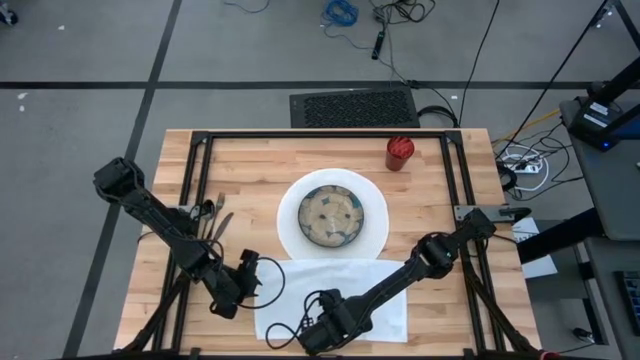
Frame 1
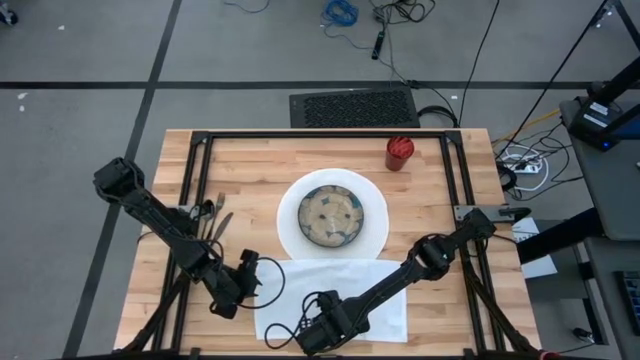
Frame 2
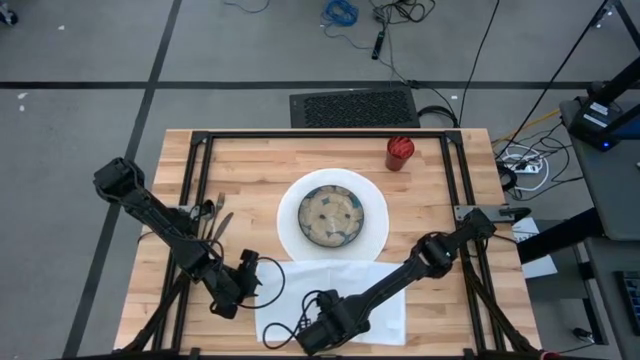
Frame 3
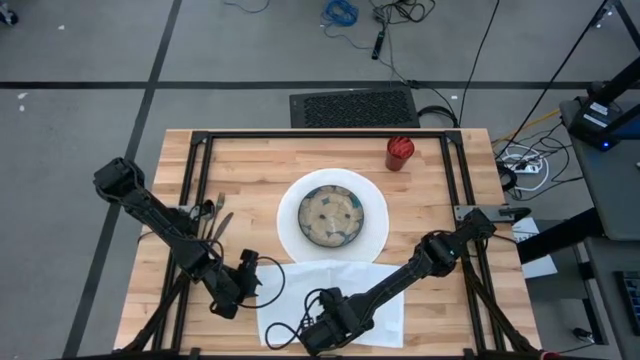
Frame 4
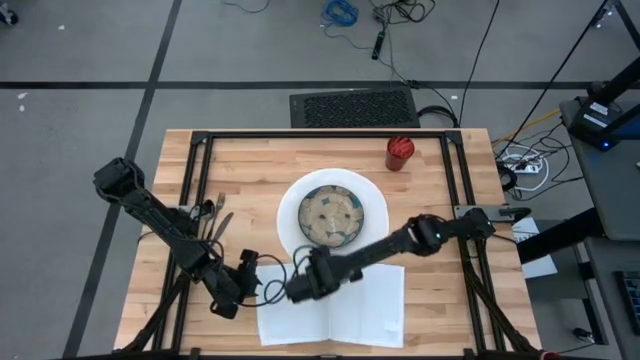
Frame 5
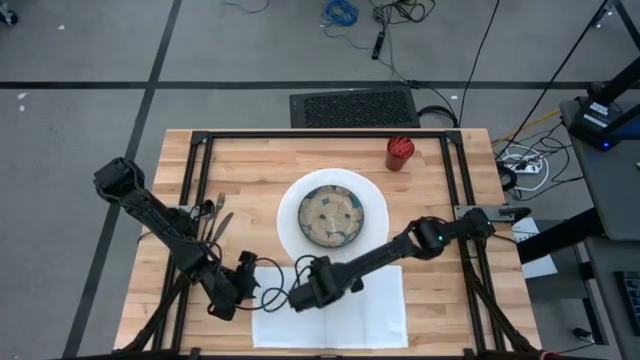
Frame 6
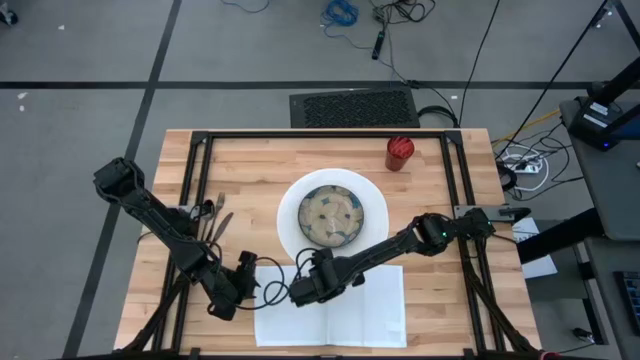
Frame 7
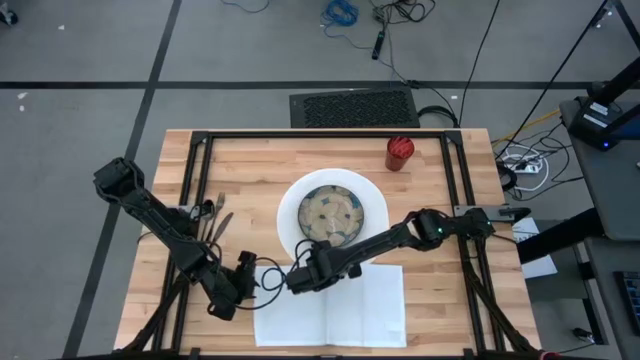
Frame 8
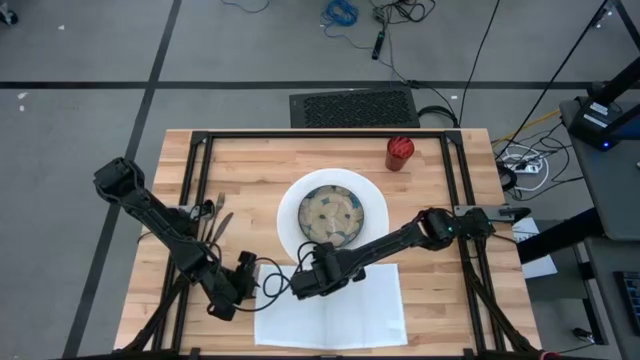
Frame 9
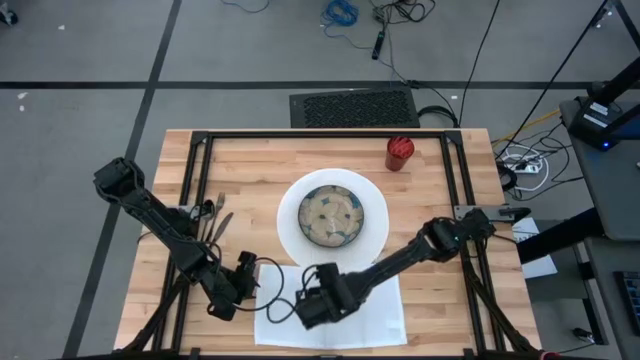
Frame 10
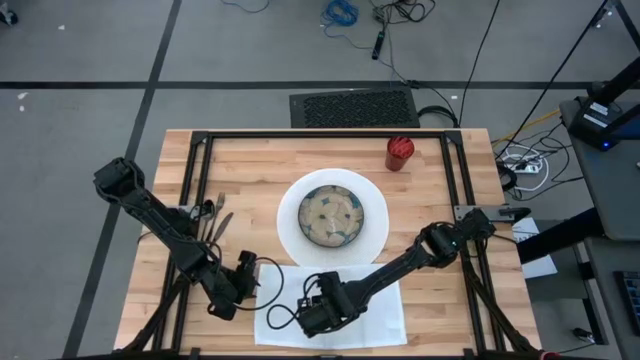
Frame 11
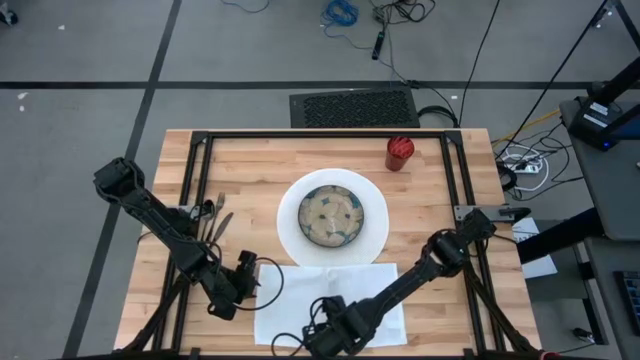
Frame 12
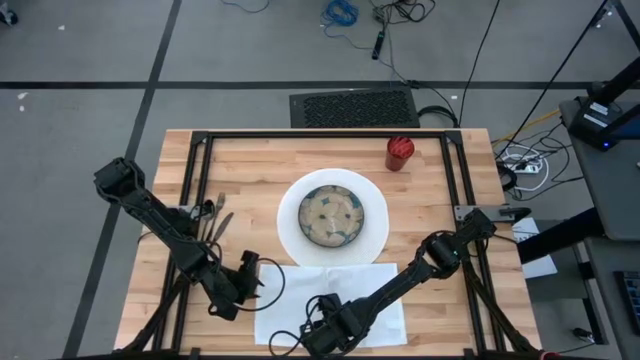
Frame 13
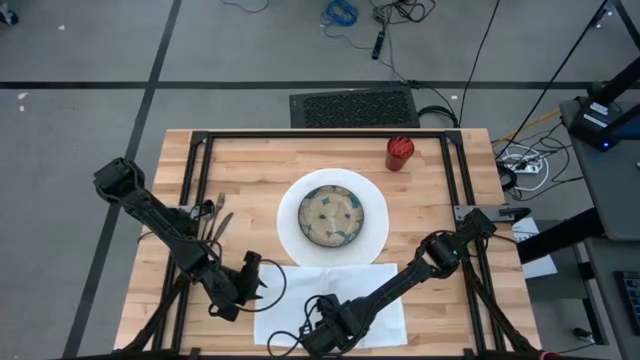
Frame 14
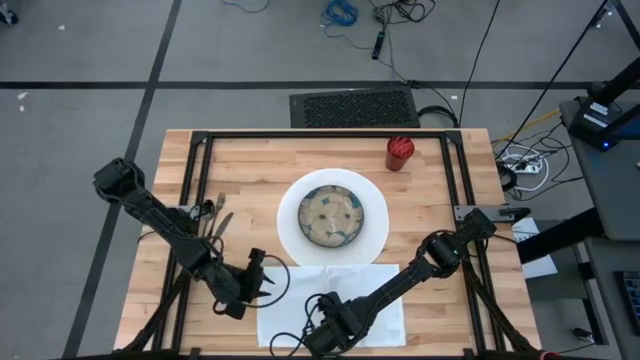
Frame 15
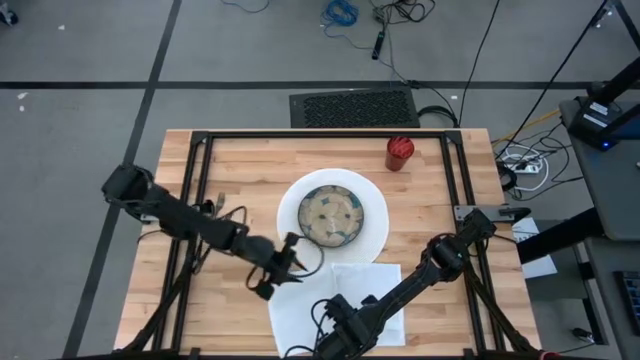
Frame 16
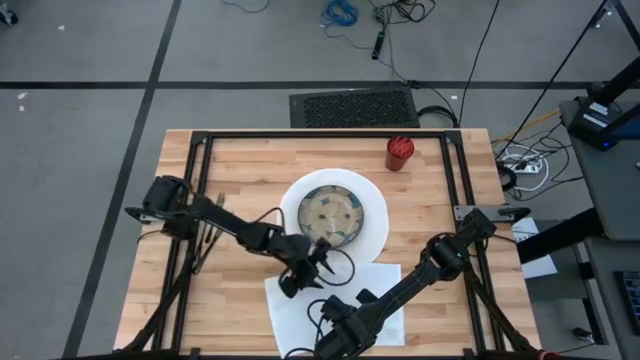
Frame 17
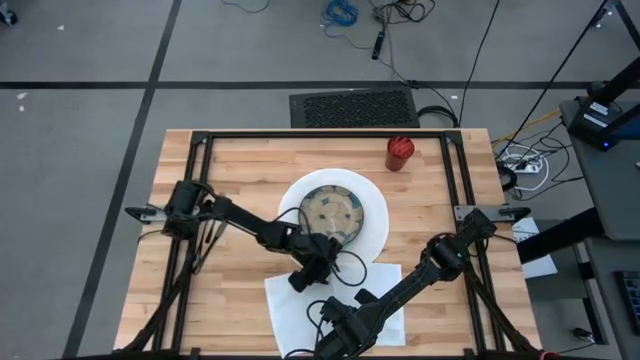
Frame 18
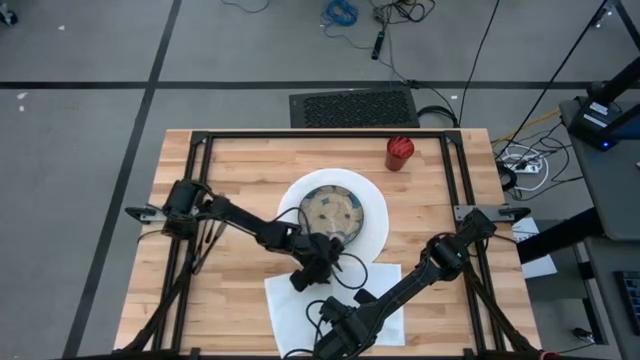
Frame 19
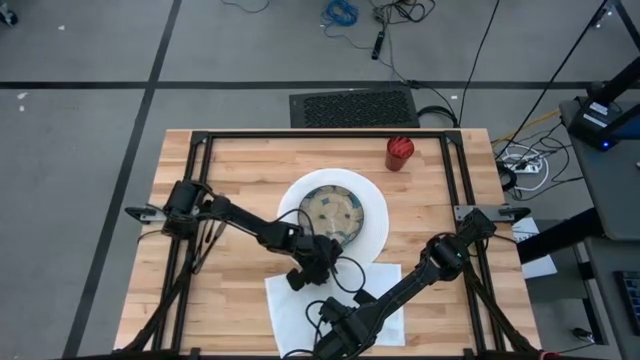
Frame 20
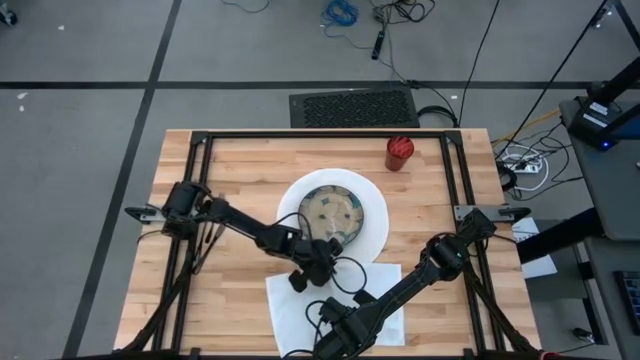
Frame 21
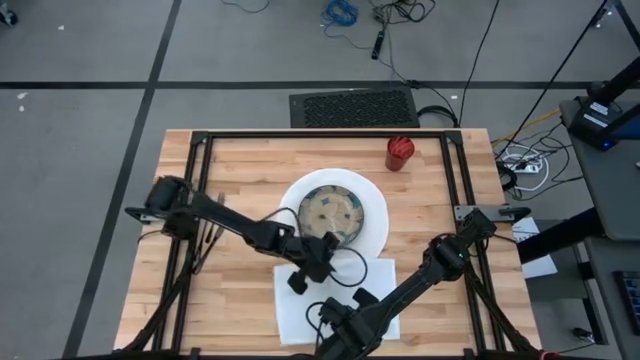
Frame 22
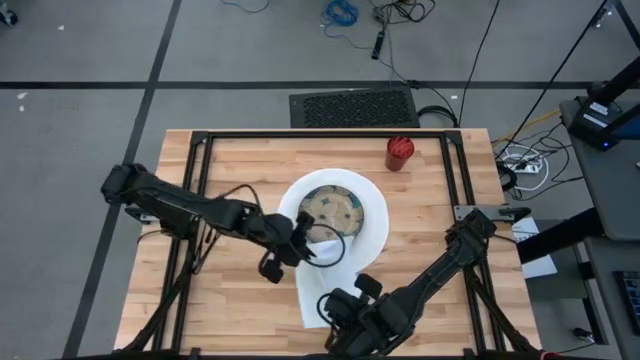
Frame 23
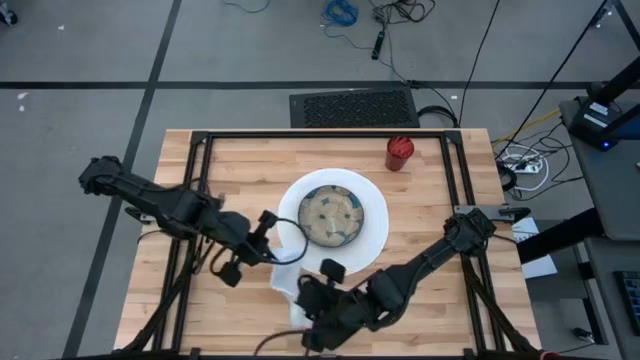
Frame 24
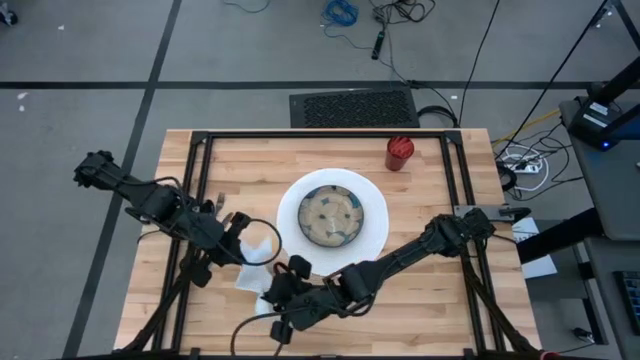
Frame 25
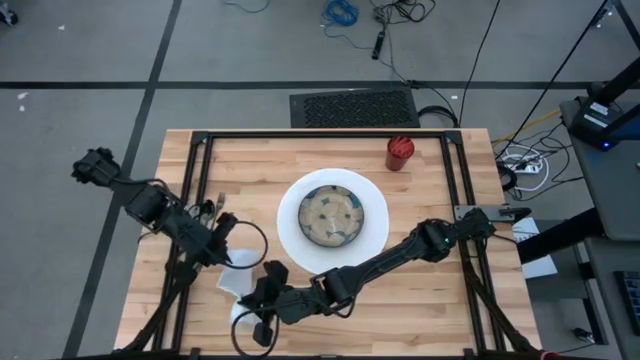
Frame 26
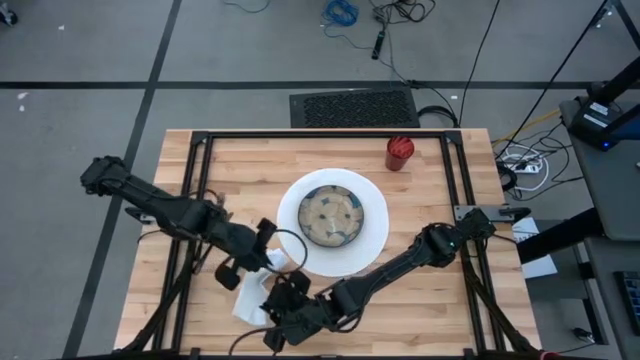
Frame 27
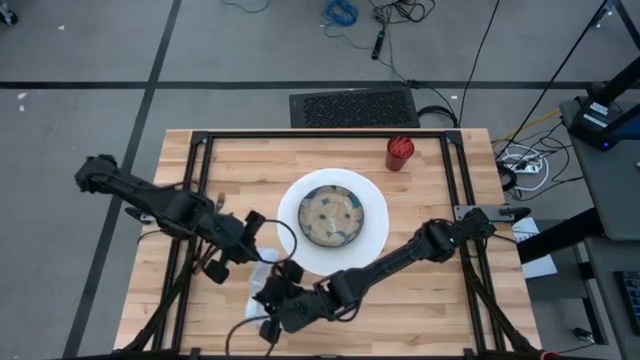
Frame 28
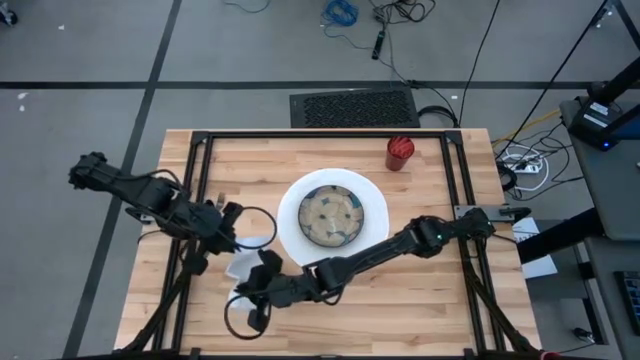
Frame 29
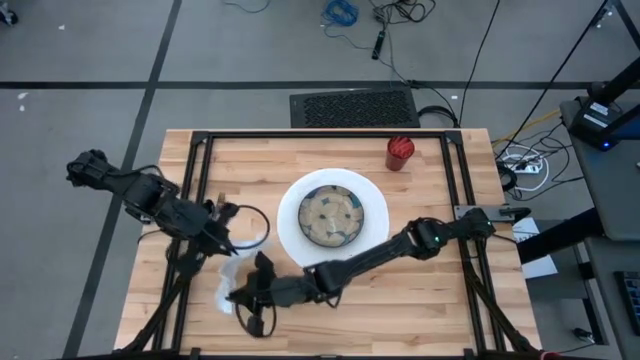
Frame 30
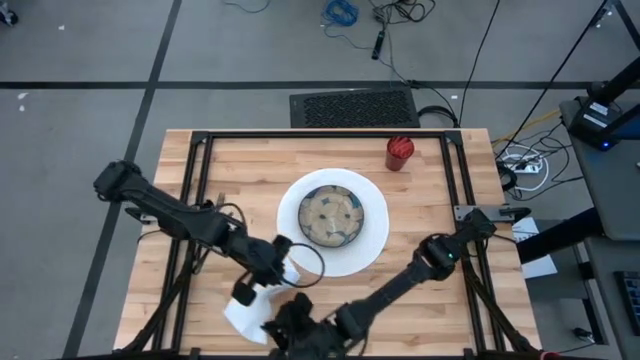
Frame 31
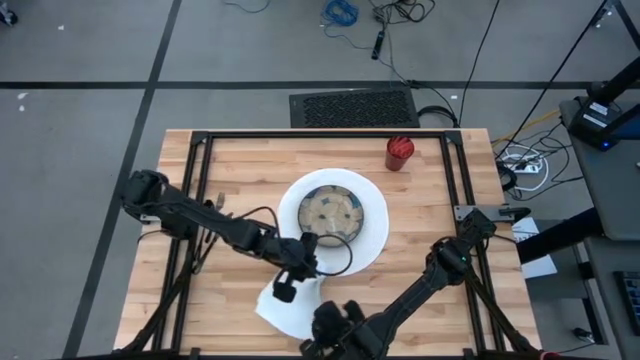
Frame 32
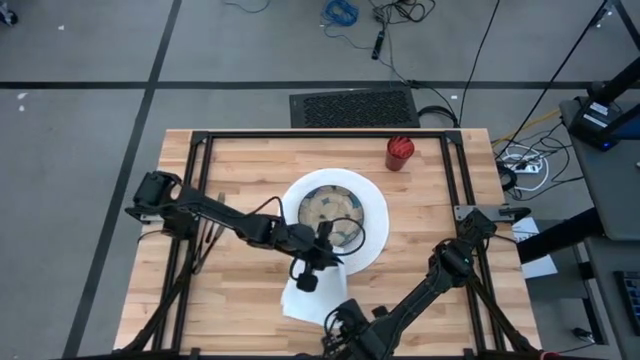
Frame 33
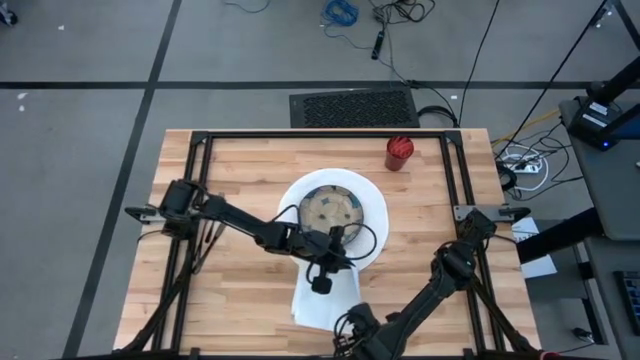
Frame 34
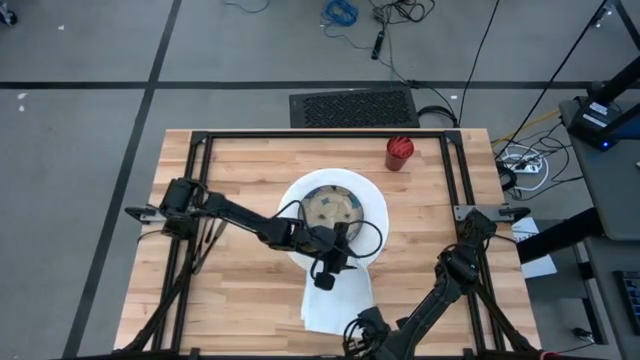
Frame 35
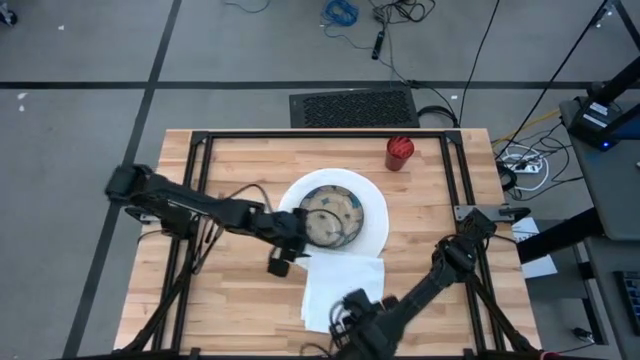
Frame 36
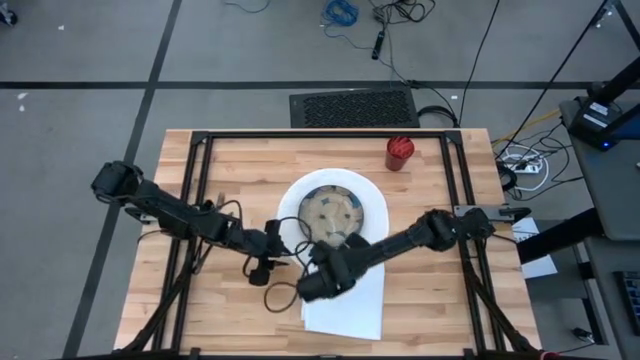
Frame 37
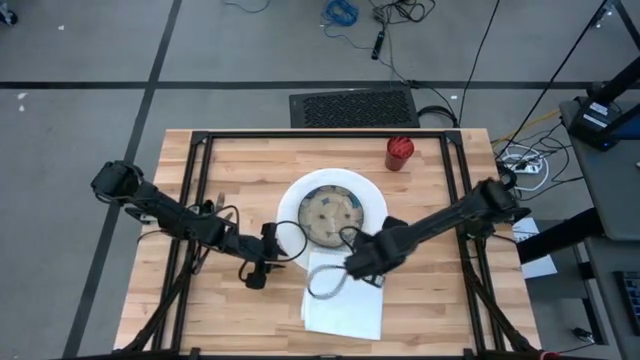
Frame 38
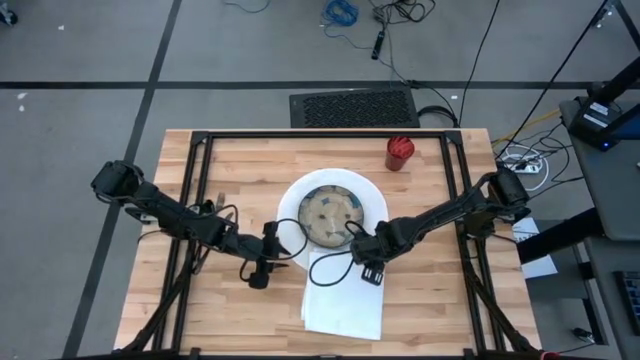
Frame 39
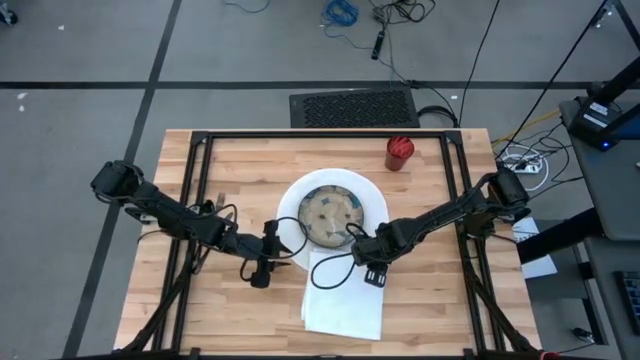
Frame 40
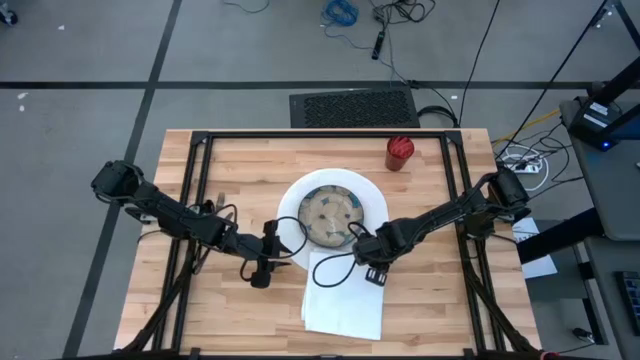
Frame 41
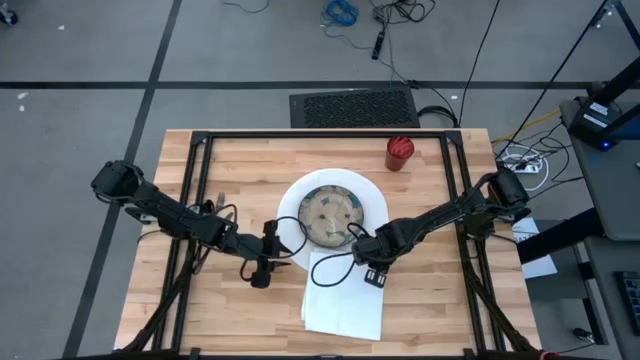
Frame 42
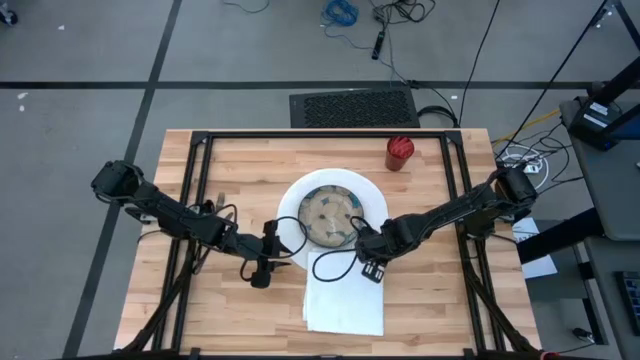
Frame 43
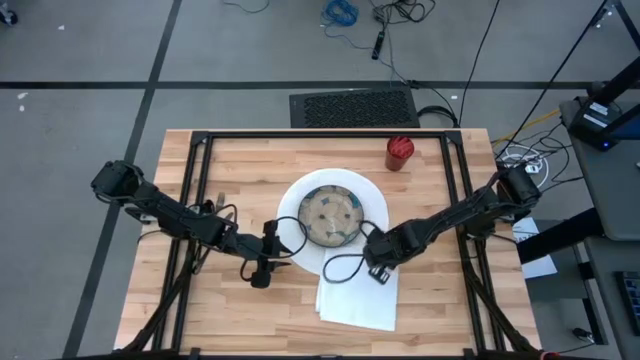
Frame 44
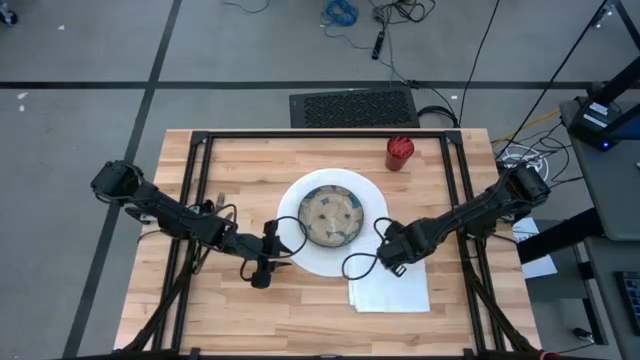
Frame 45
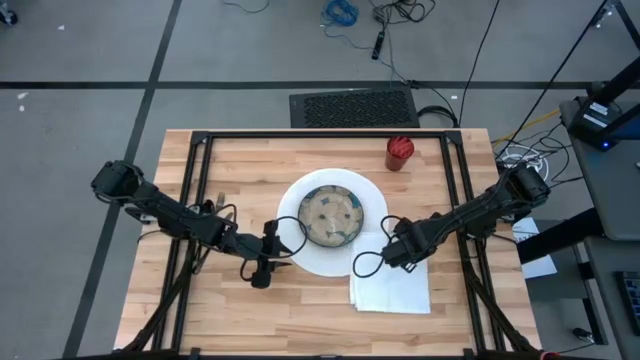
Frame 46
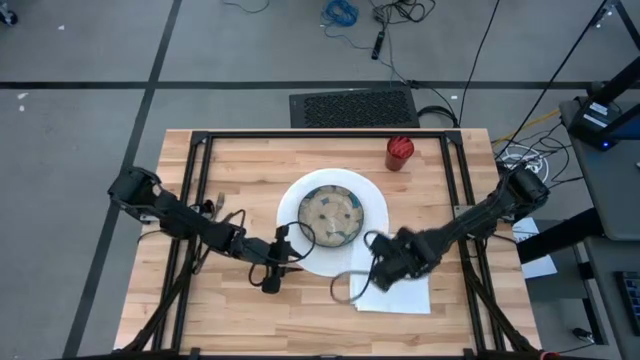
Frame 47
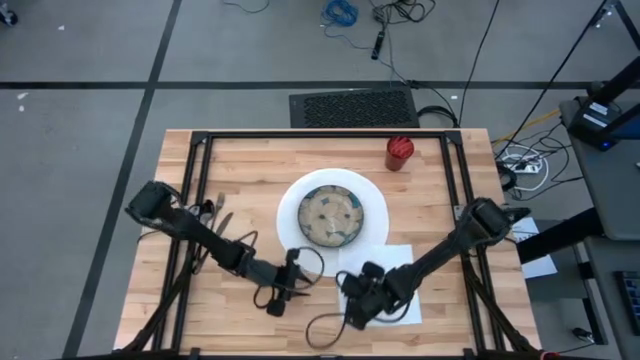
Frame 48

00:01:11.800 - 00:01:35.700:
Task: Set table place
Fold the white table napkin
